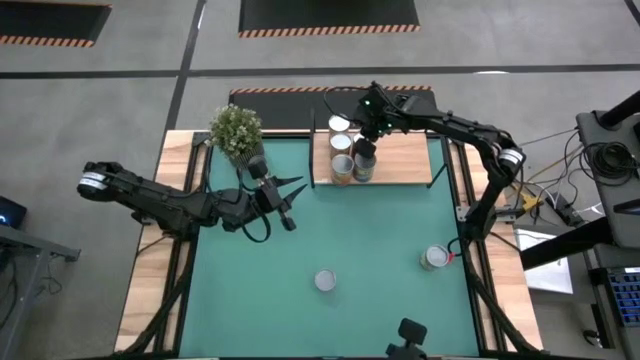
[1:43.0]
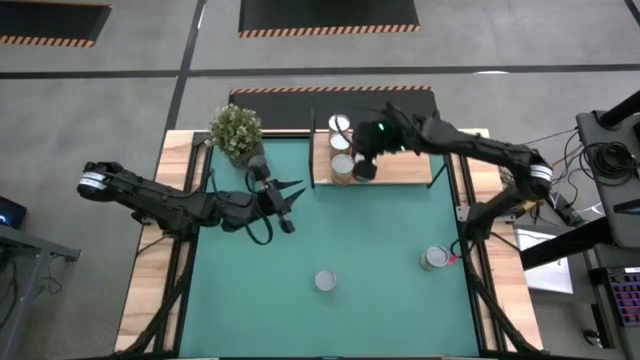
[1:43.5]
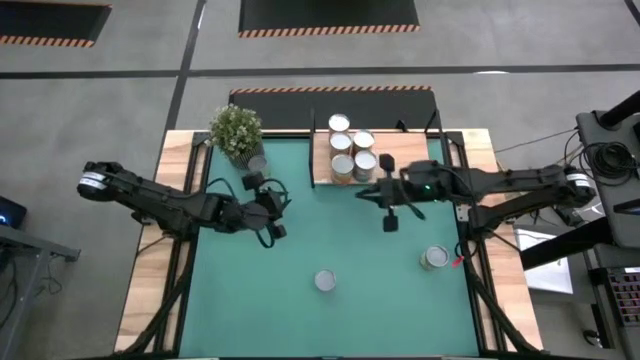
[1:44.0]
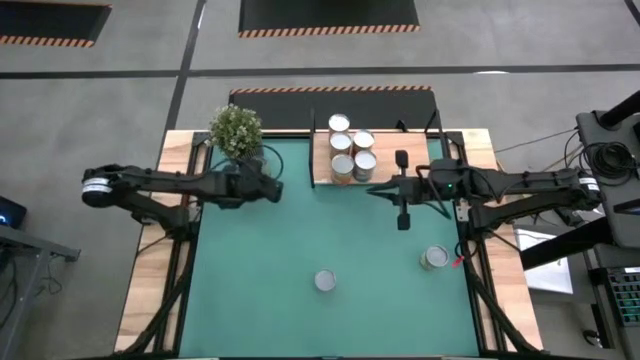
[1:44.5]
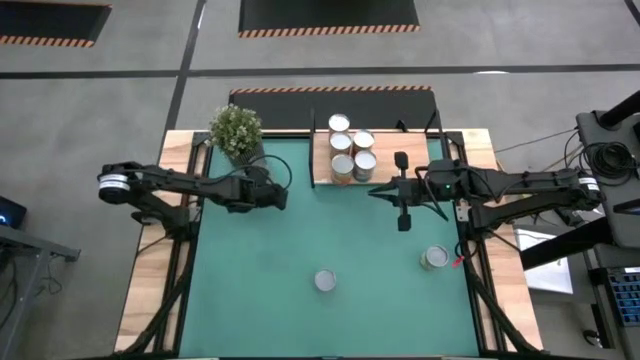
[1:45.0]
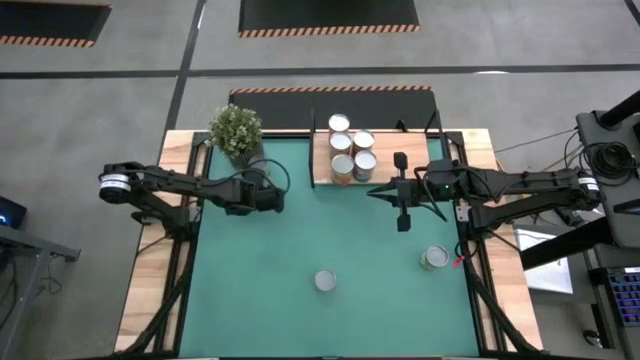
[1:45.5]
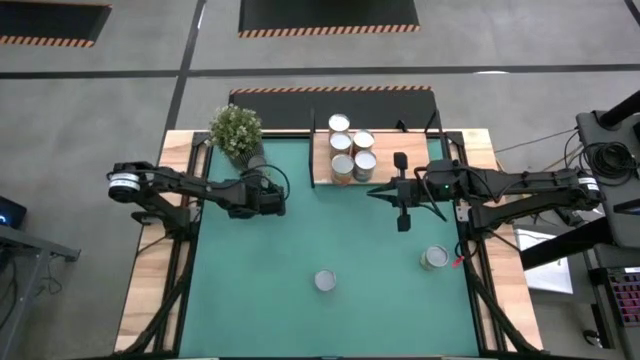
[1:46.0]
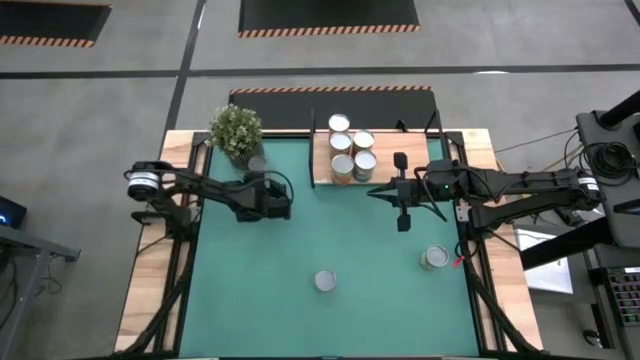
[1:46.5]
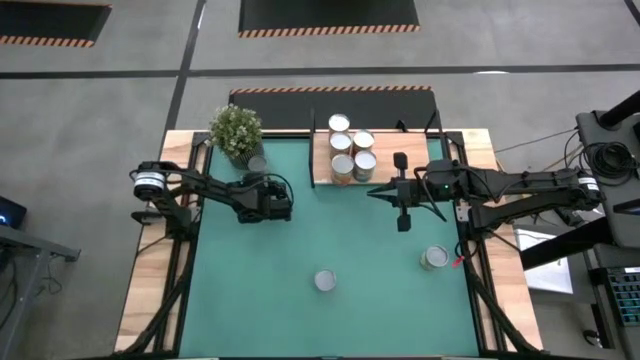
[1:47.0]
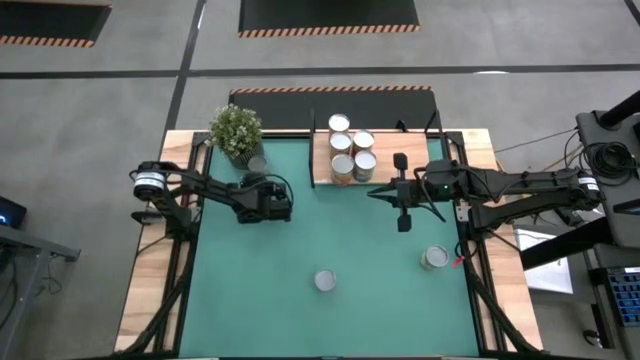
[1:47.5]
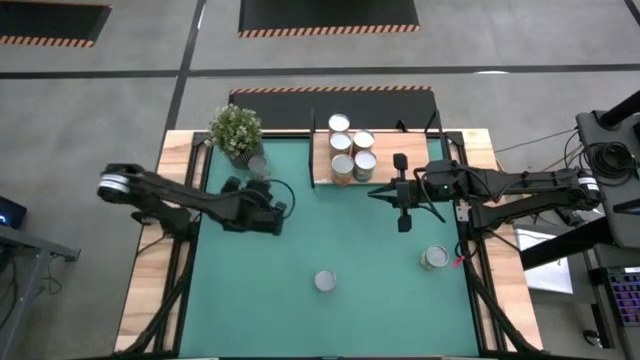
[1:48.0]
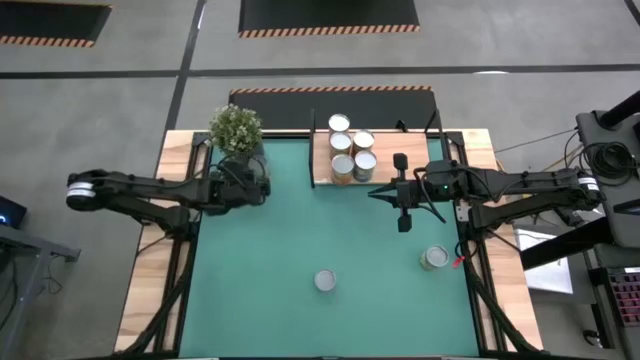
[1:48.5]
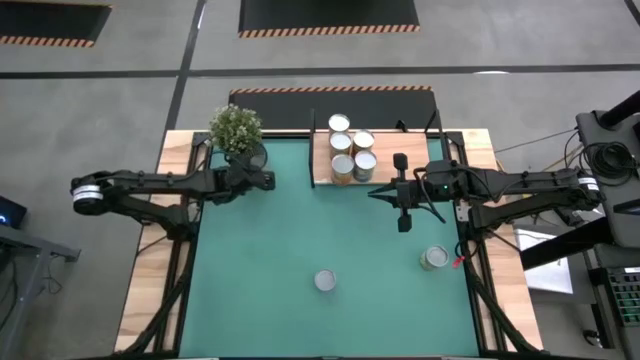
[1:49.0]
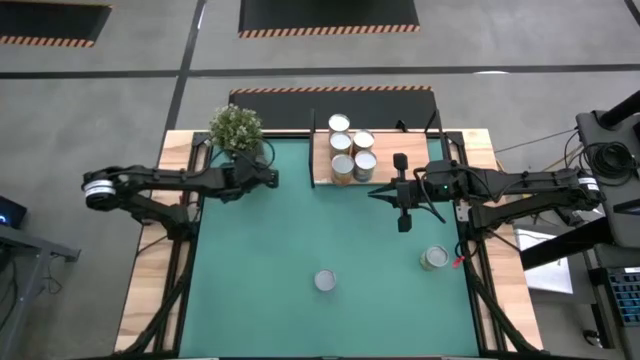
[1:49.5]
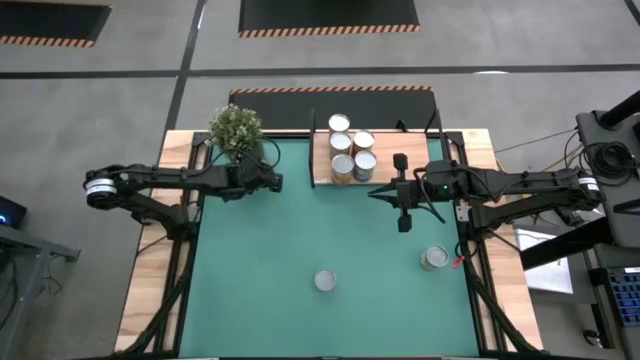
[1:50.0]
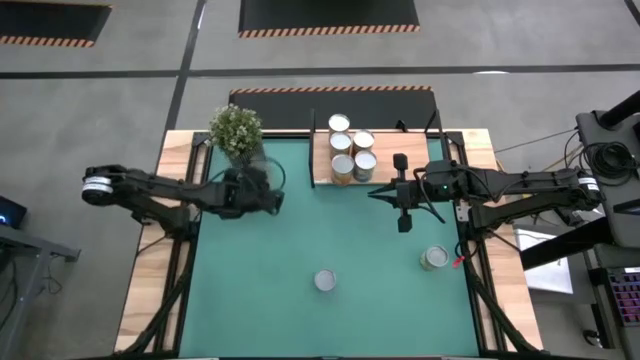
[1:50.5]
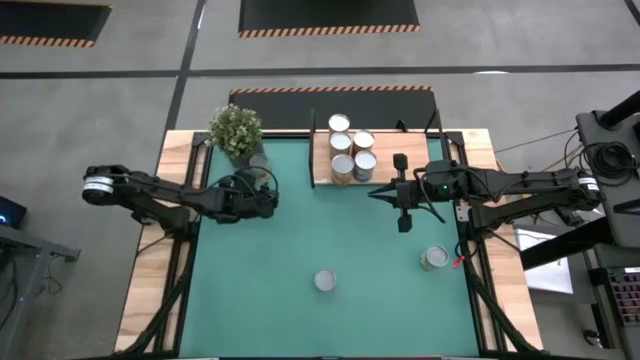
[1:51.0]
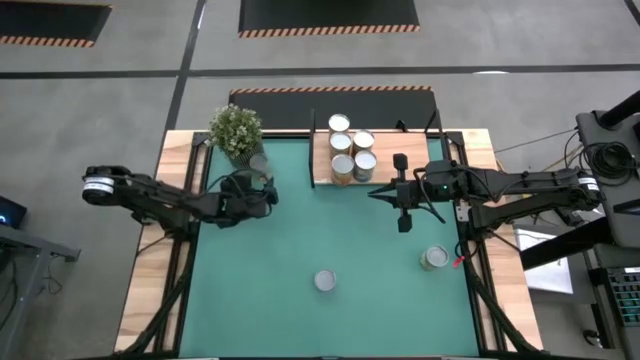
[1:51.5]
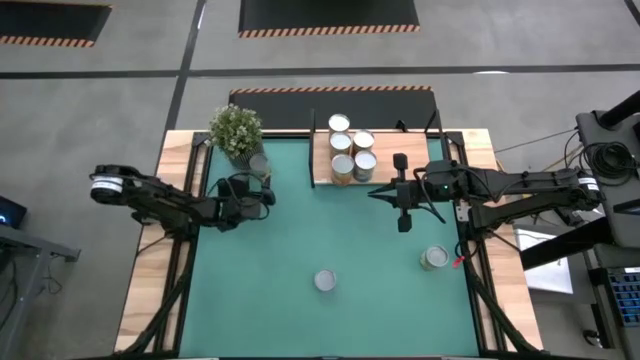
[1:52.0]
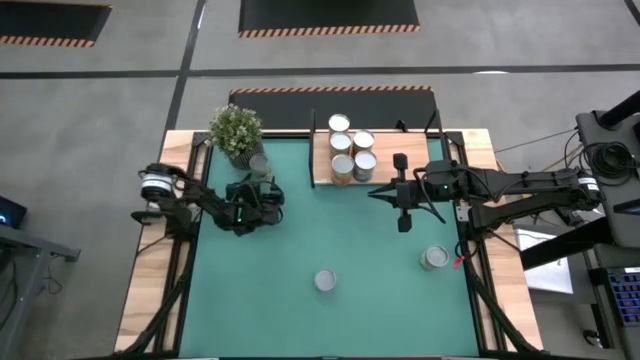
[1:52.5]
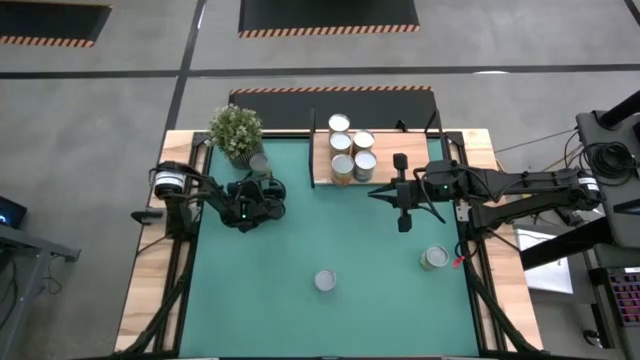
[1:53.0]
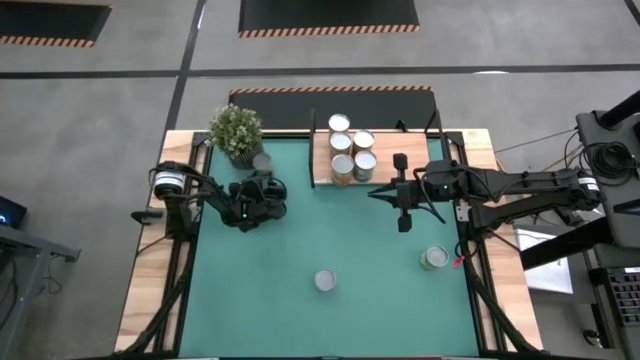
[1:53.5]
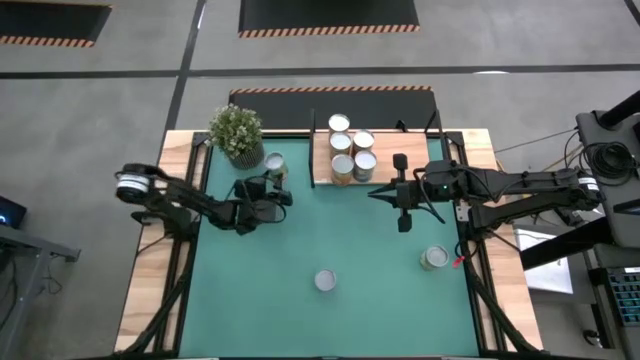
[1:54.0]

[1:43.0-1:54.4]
Task: Pick and place cans onto a shelf
Put the green can on the shelf

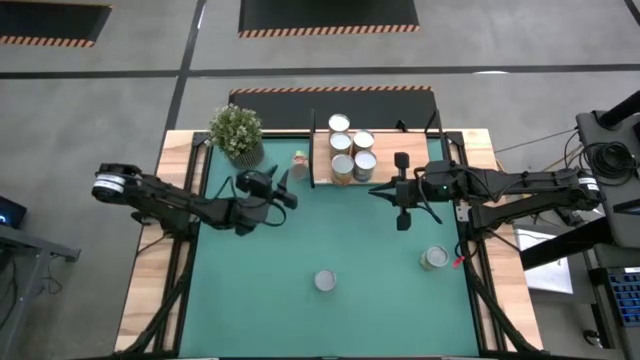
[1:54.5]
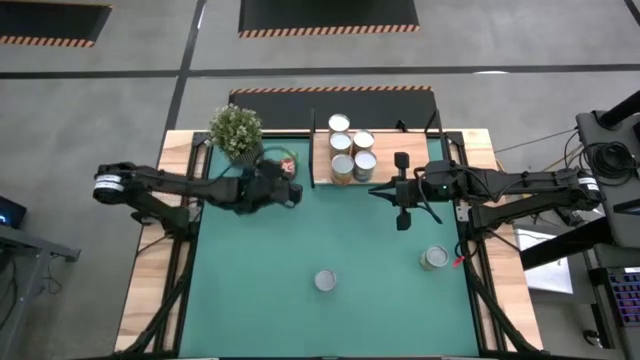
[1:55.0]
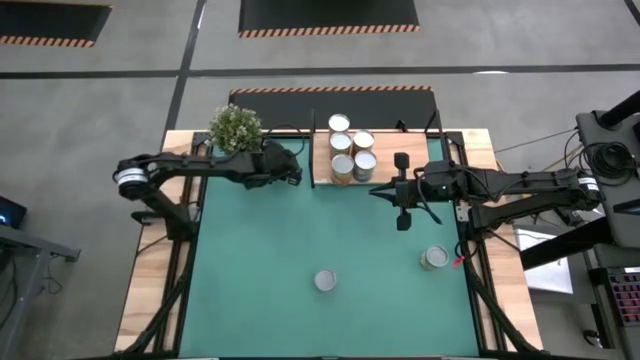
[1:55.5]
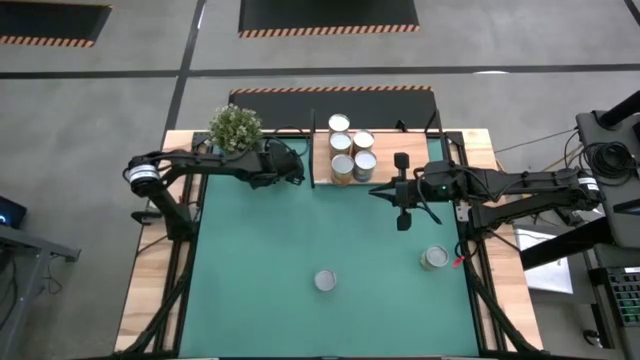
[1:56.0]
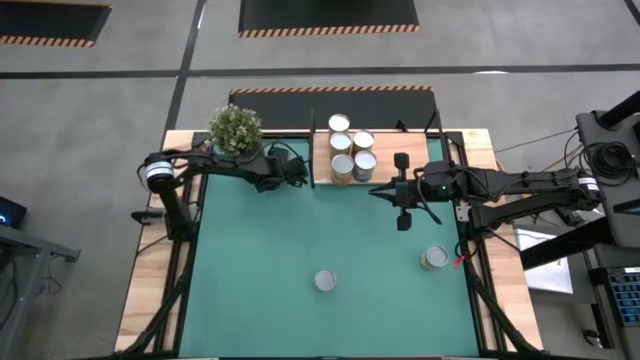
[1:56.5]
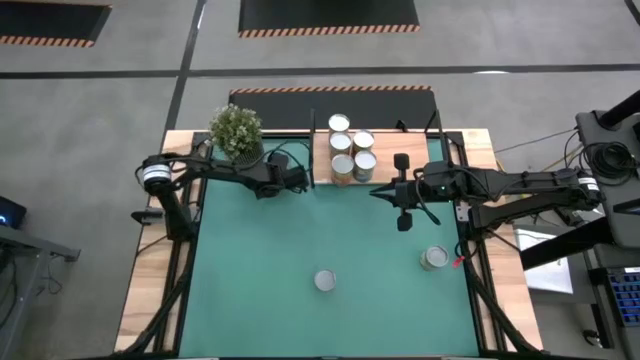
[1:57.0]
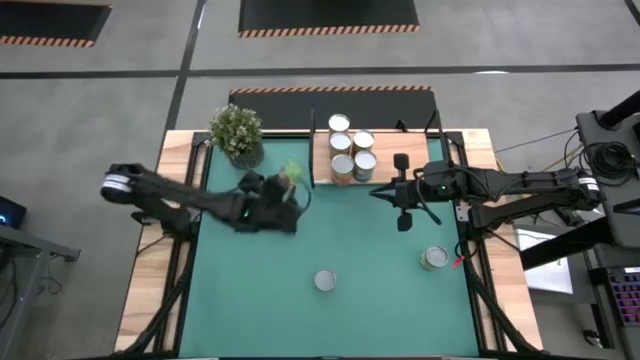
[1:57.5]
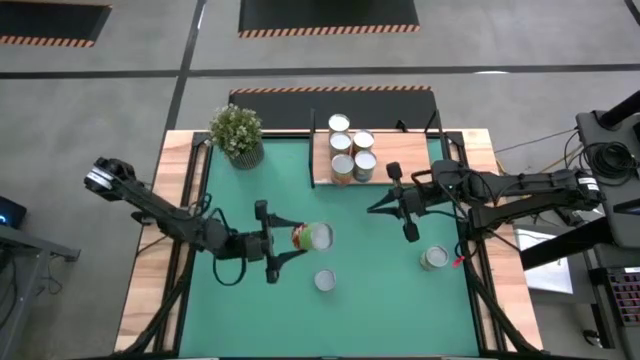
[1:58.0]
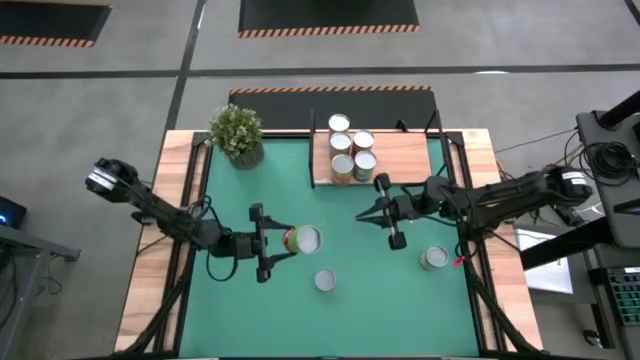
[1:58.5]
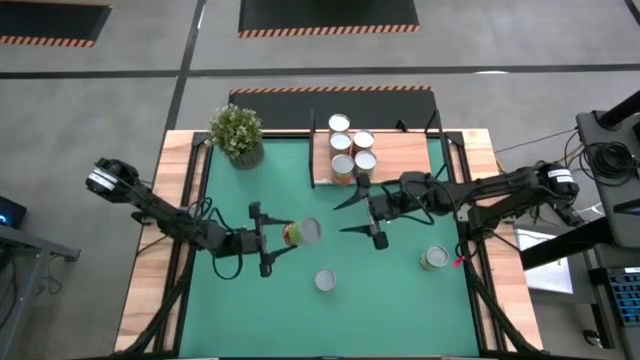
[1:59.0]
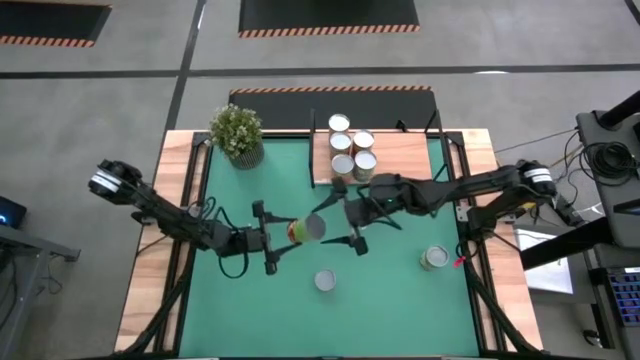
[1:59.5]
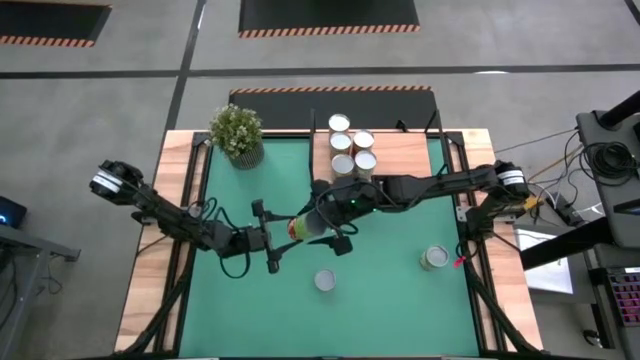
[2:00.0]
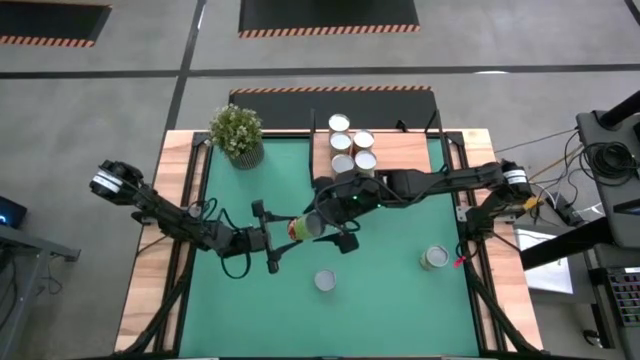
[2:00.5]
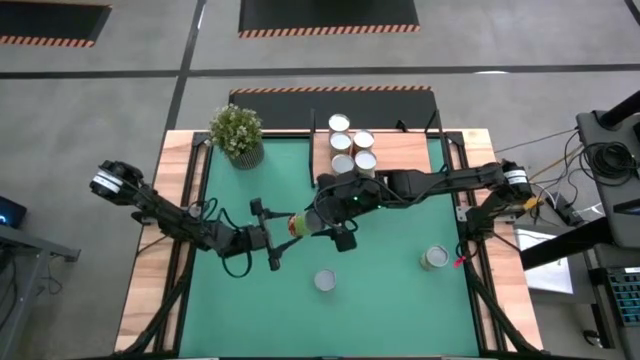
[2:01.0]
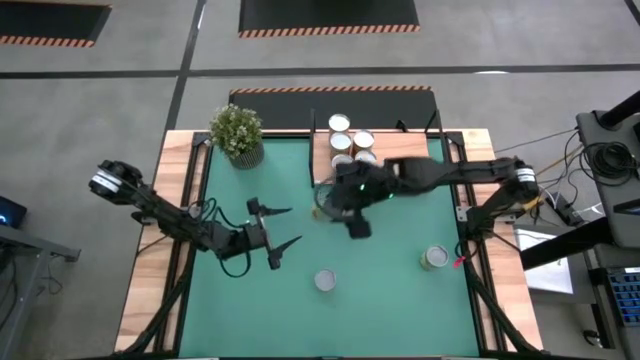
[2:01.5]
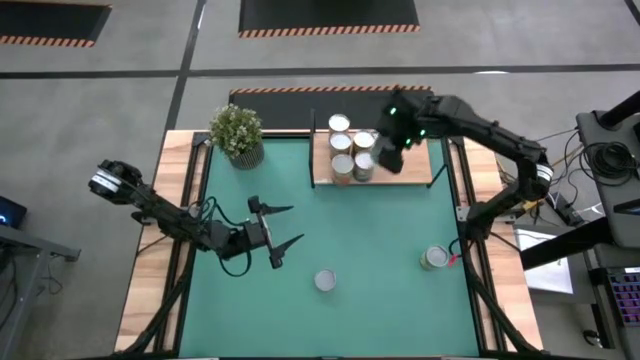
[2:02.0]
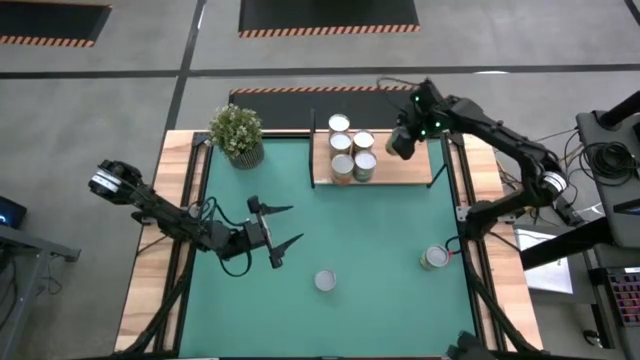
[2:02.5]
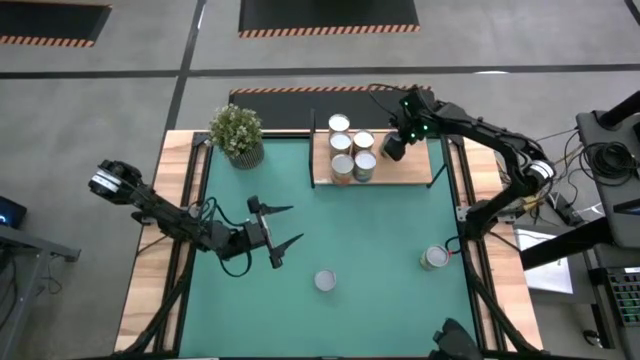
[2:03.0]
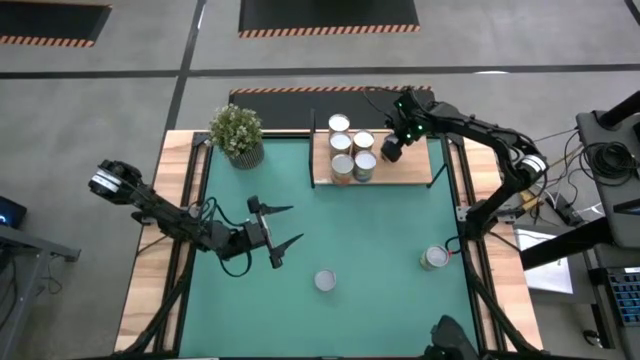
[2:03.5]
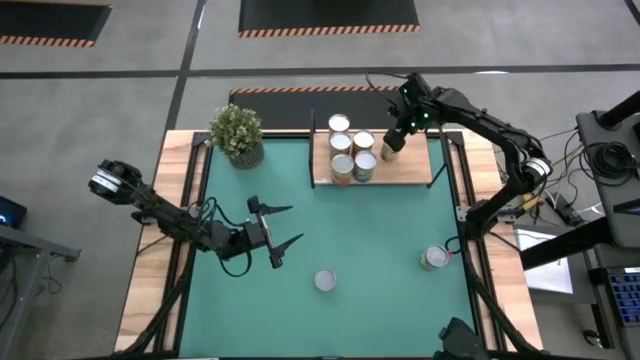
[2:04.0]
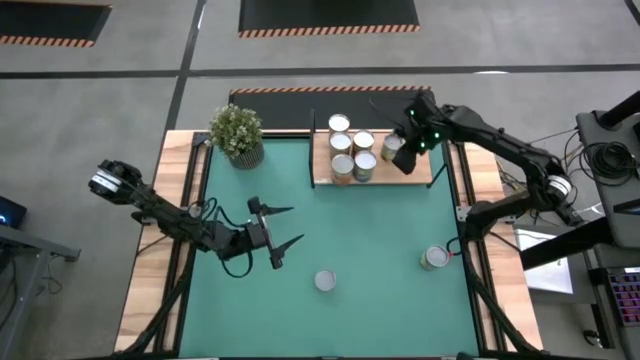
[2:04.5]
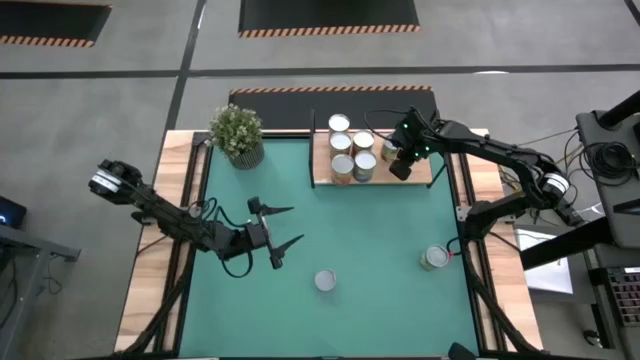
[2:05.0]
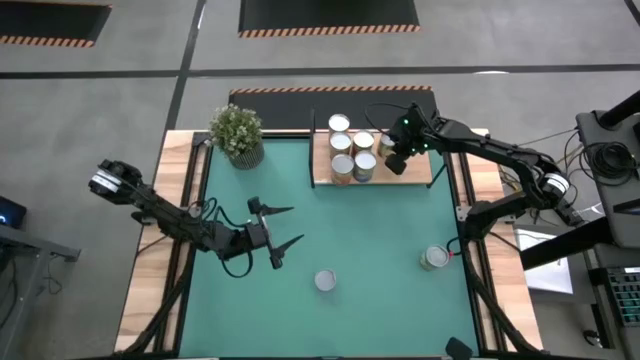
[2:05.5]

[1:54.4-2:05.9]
Put the green can on the shelf
